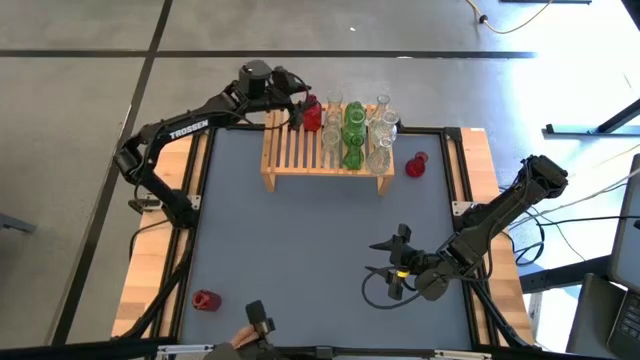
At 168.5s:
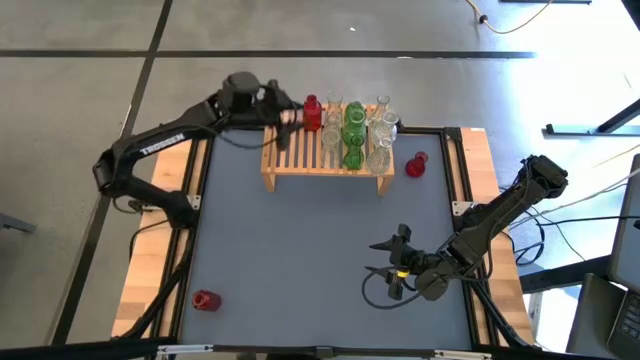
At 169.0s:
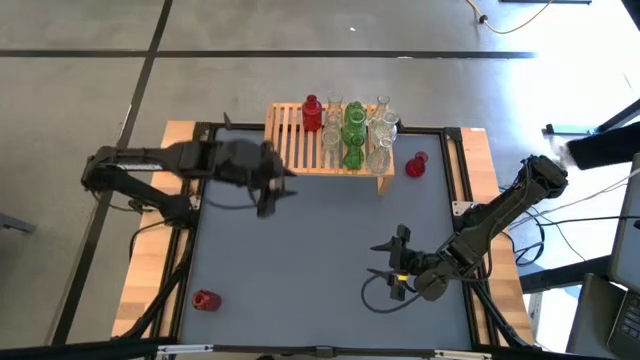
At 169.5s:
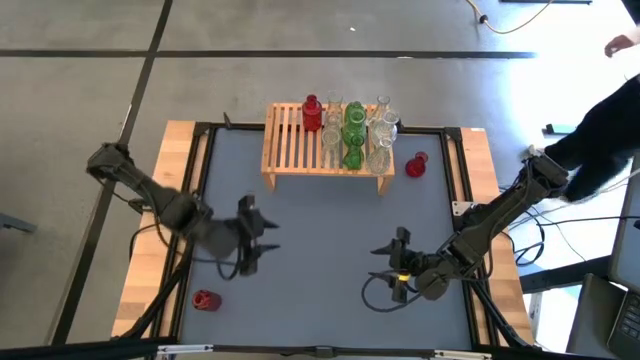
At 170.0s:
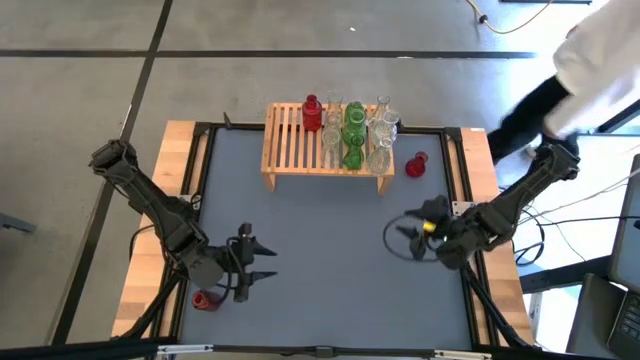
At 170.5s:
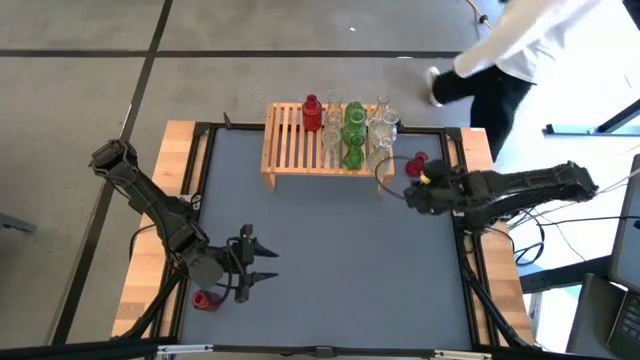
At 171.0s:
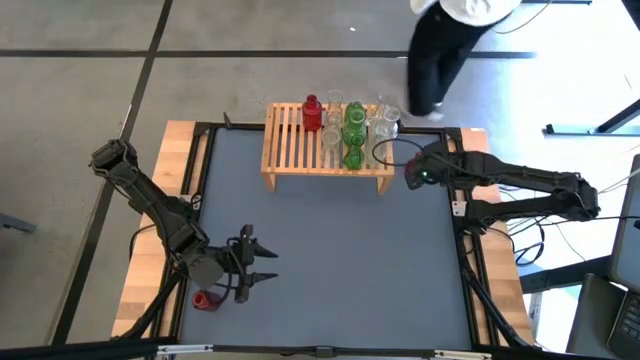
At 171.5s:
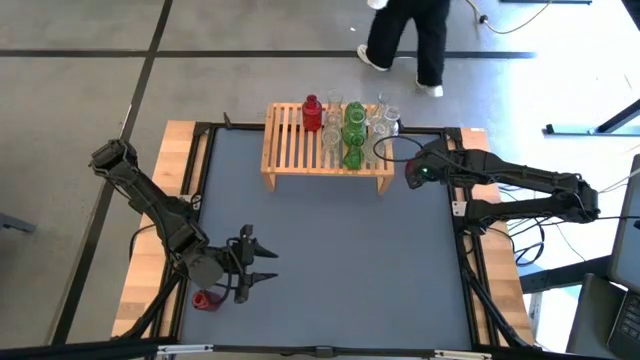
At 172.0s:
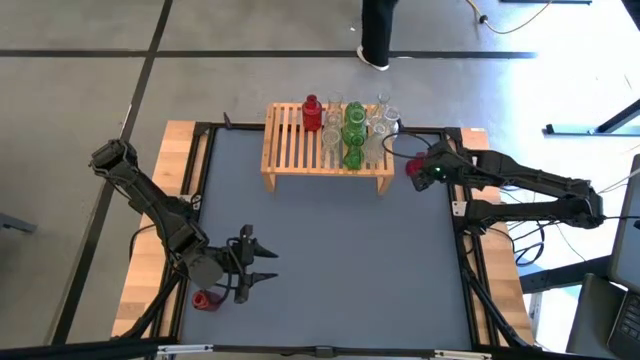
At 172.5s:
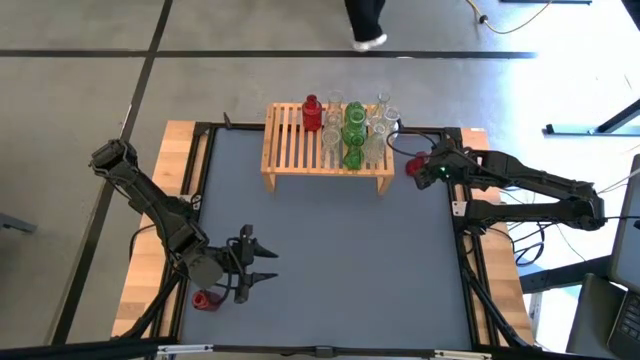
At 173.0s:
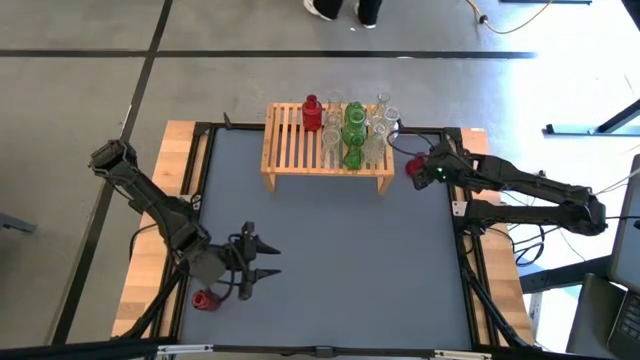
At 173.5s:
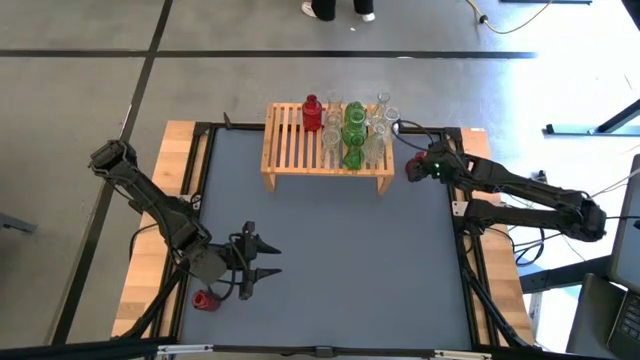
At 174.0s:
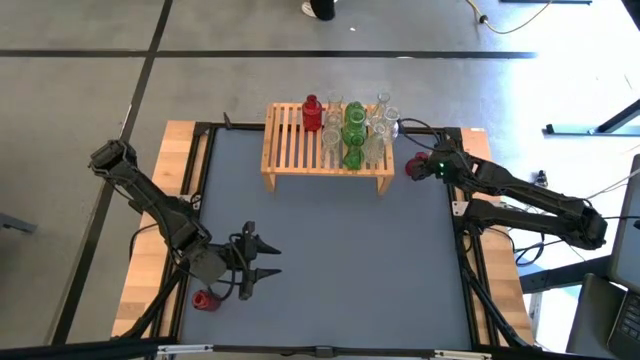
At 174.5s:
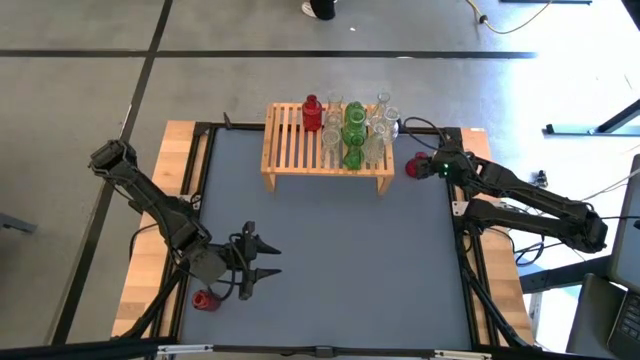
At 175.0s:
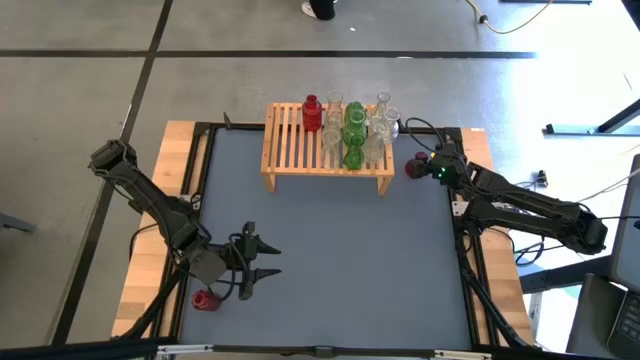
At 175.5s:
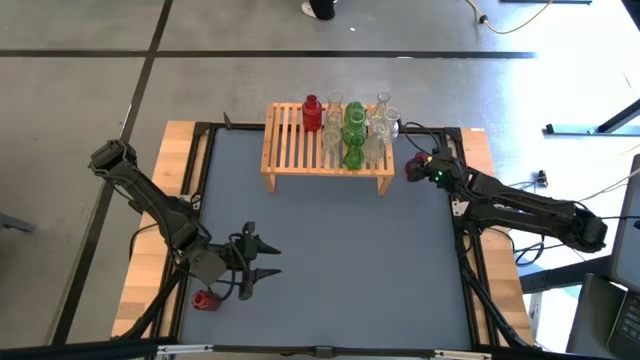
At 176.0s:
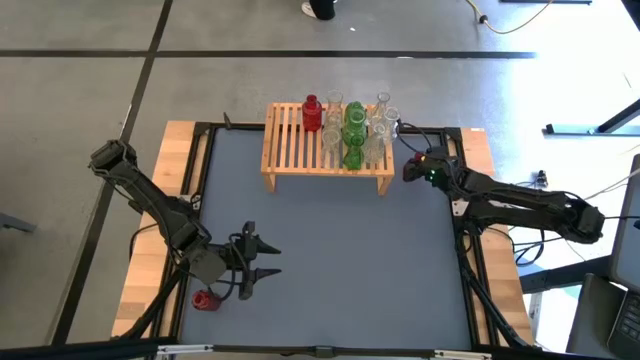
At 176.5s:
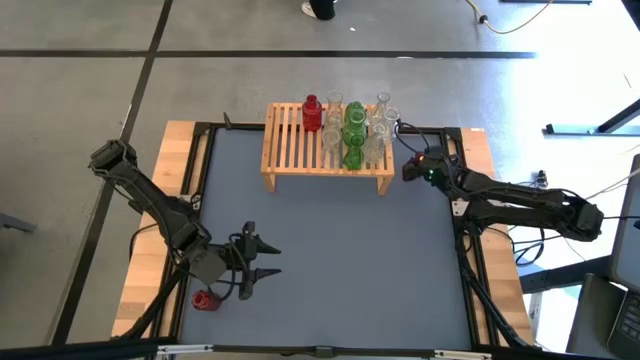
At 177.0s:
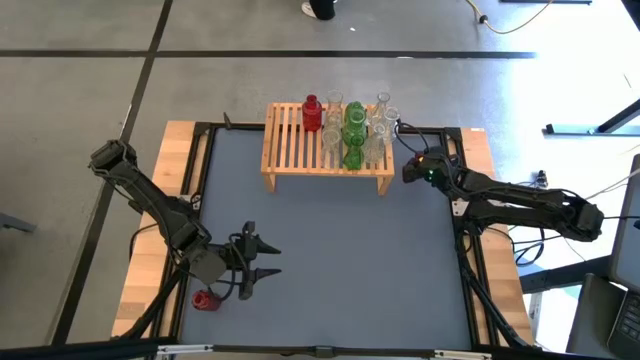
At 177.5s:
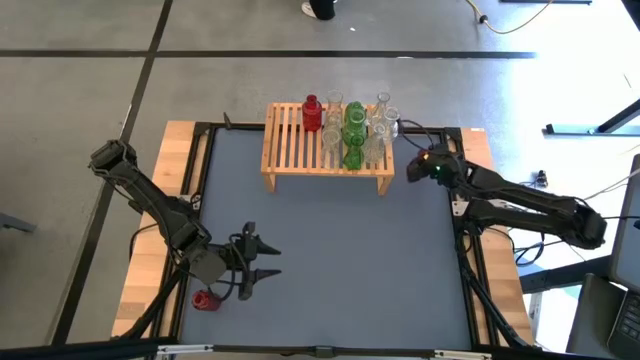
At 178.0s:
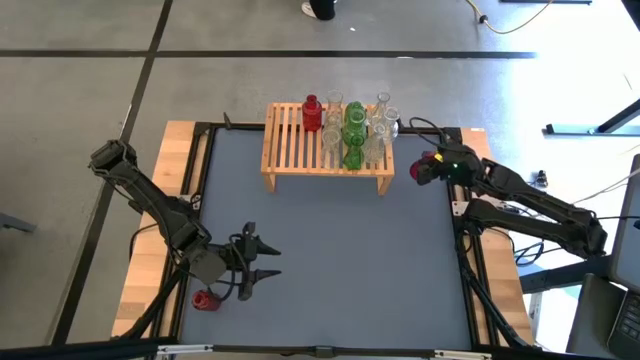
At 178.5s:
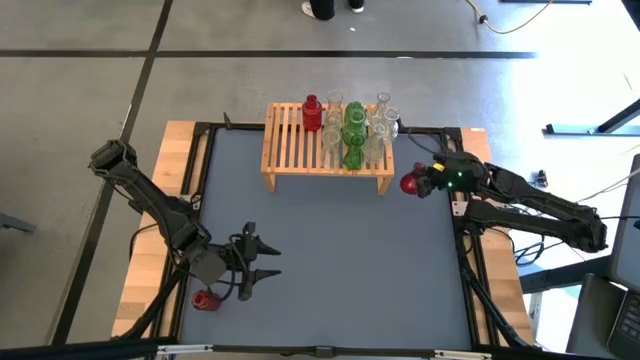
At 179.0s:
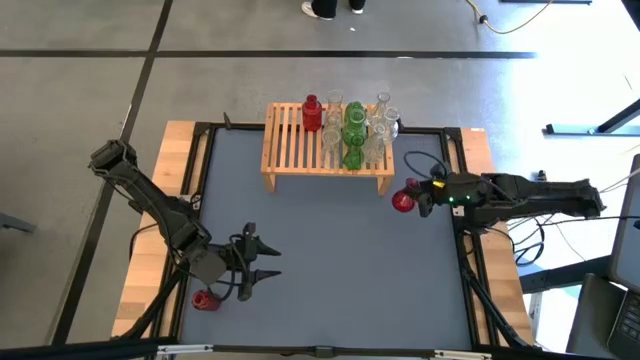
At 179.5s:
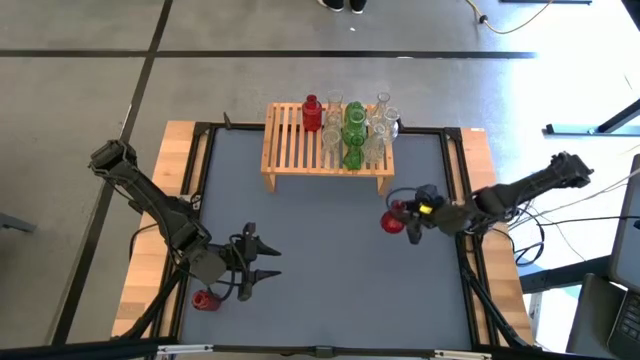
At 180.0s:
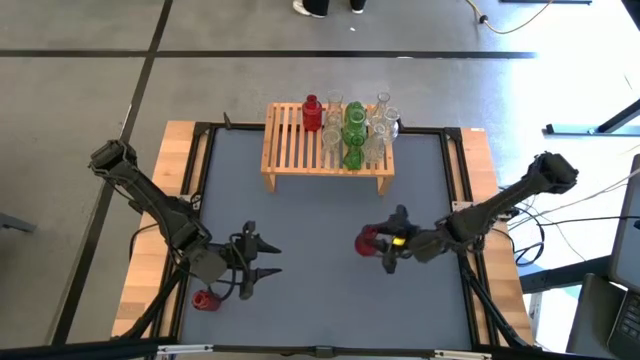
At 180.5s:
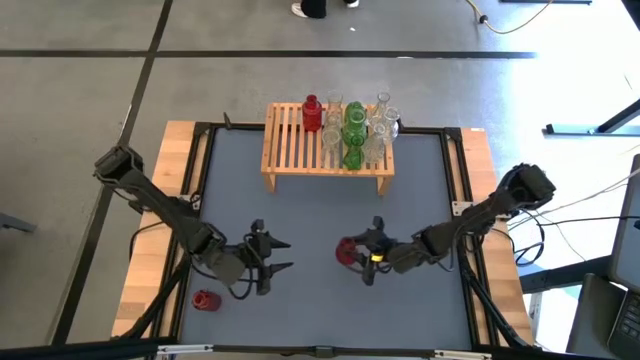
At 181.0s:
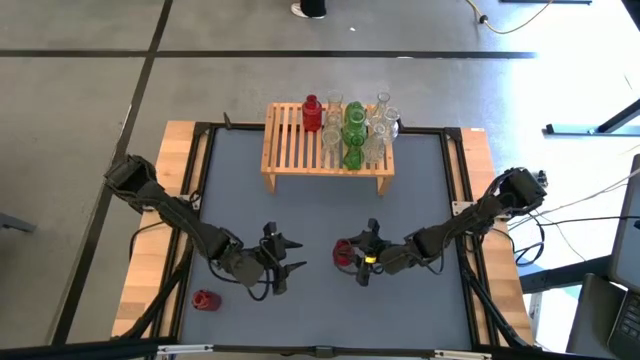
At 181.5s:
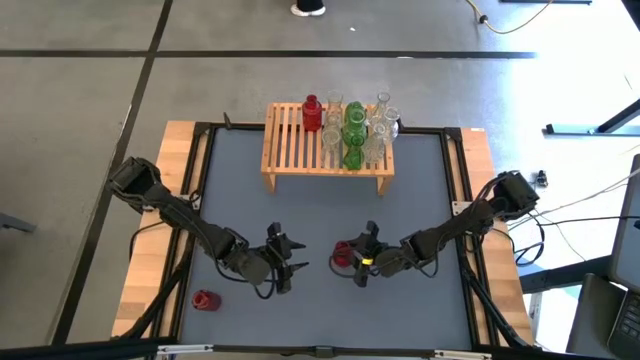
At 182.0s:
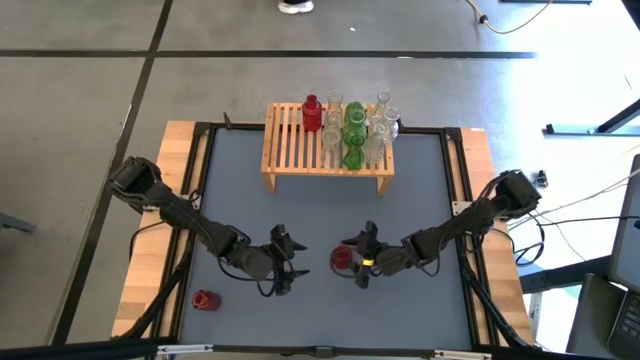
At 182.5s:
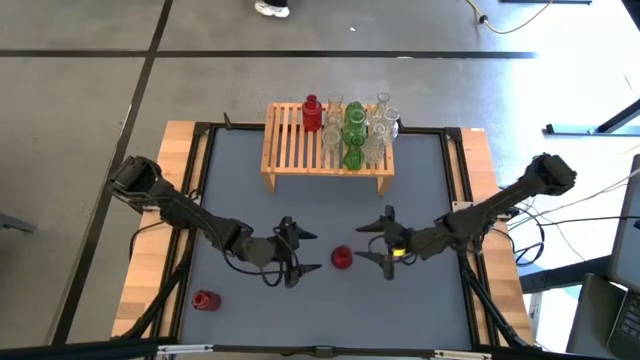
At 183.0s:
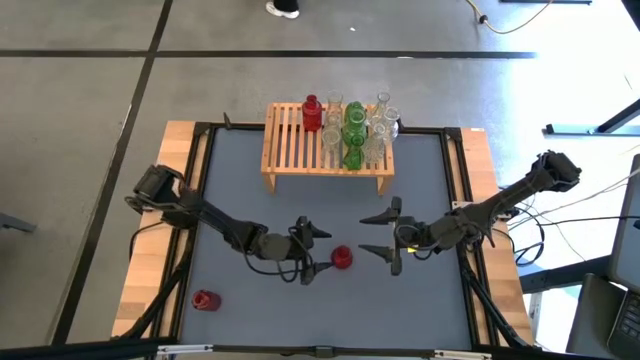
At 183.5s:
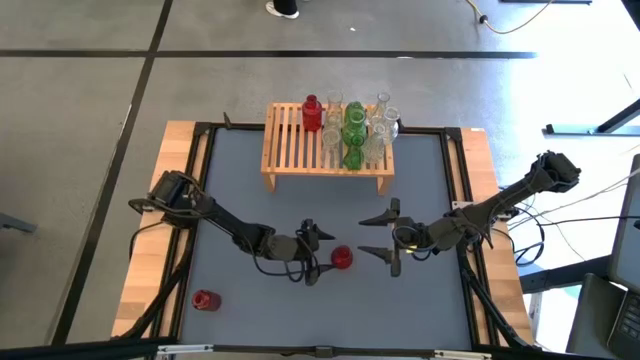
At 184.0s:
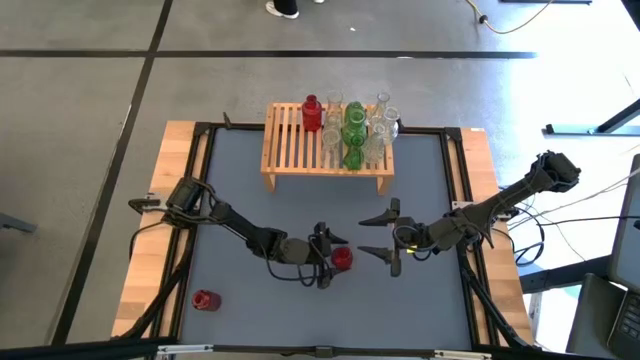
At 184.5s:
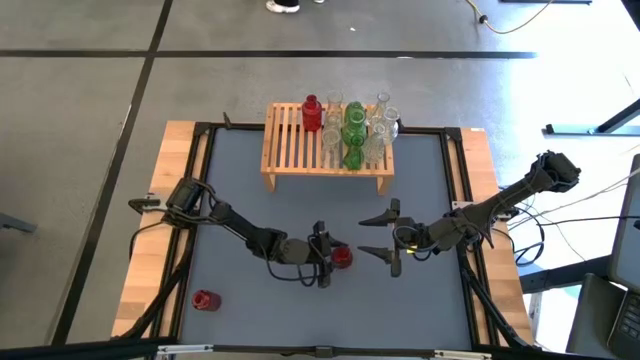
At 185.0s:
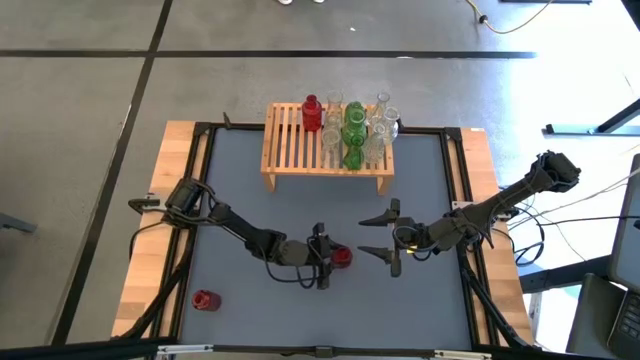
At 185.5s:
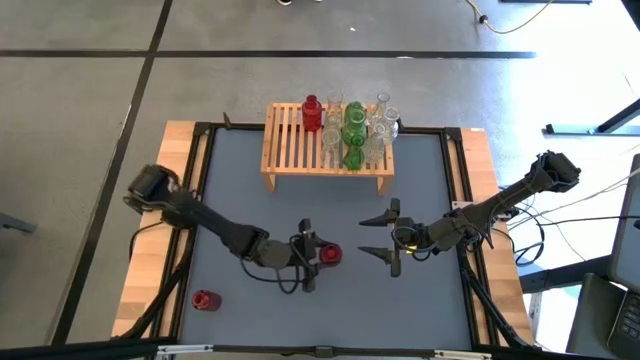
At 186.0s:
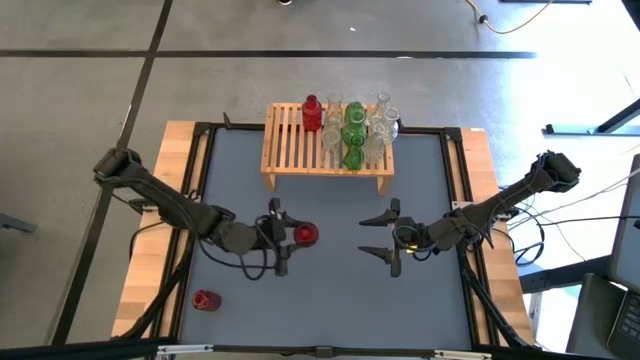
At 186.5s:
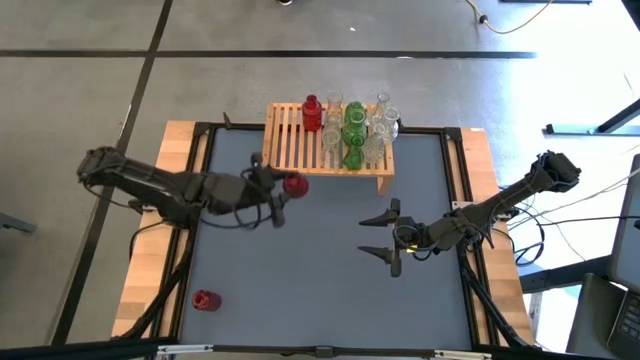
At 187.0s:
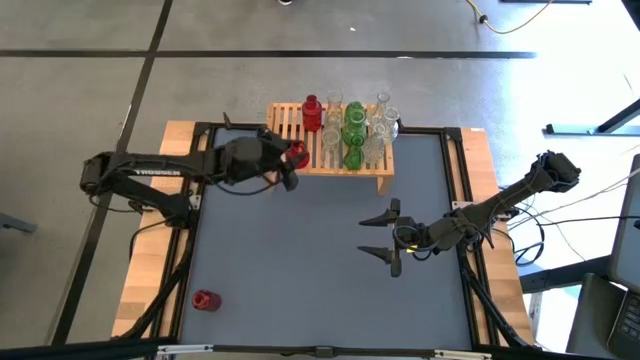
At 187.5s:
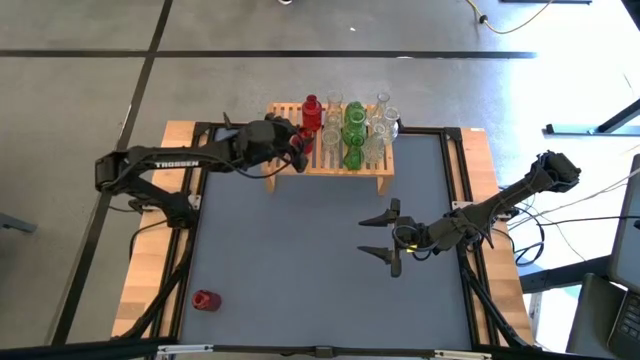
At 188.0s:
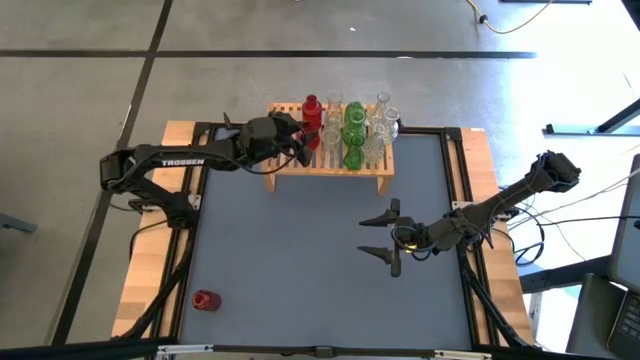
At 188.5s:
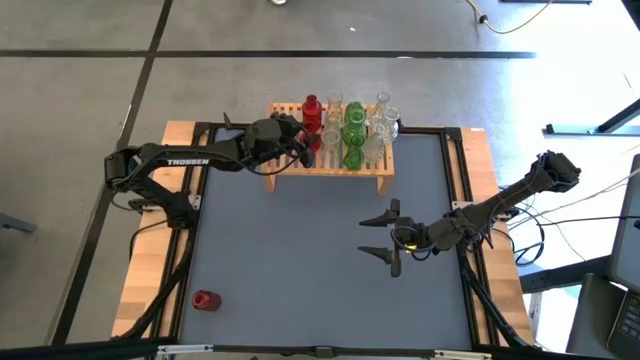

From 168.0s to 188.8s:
Task: sort vases onto shelf
Put the red vase on the shelf aligned with the other red vase

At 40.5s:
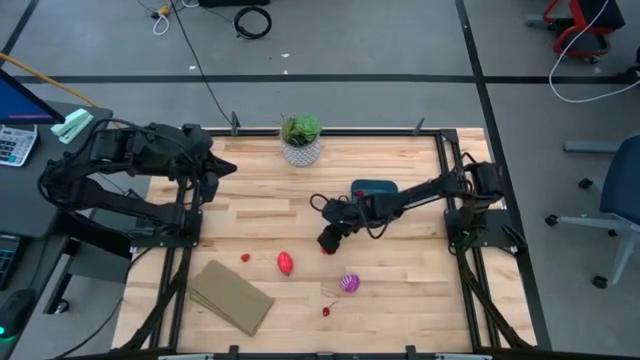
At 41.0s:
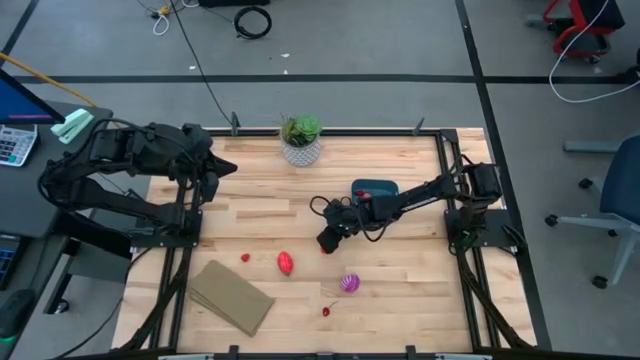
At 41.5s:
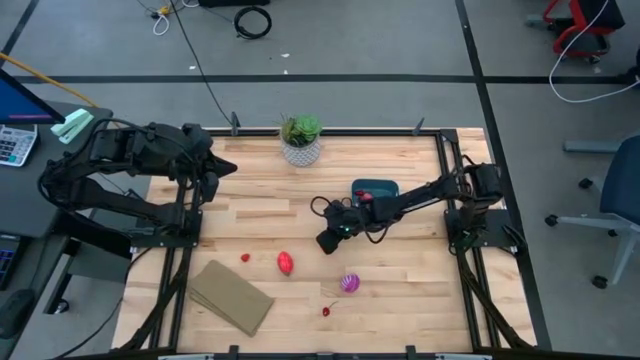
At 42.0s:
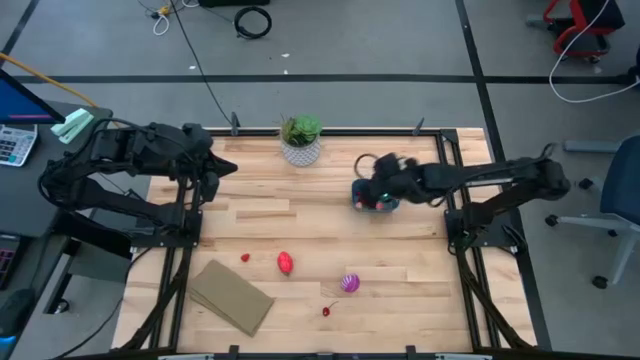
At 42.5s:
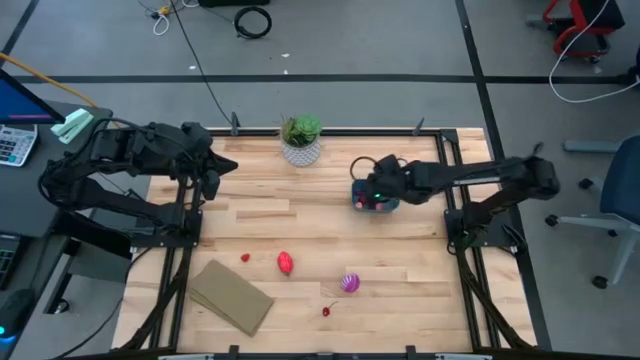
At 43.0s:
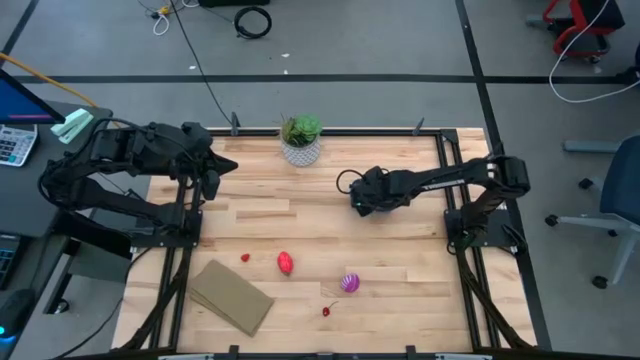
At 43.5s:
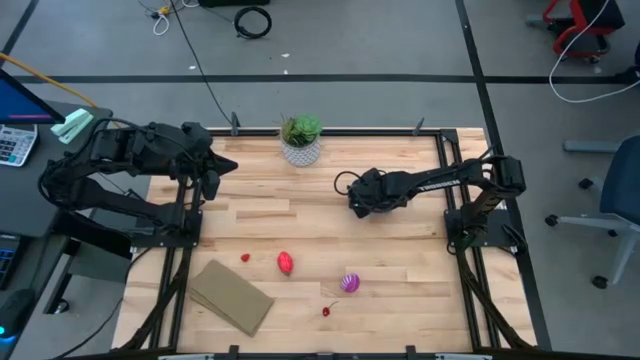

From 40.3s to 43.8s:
Task: Pick and placing Produce into tupperware
Put the red strawberry into the blue bin
